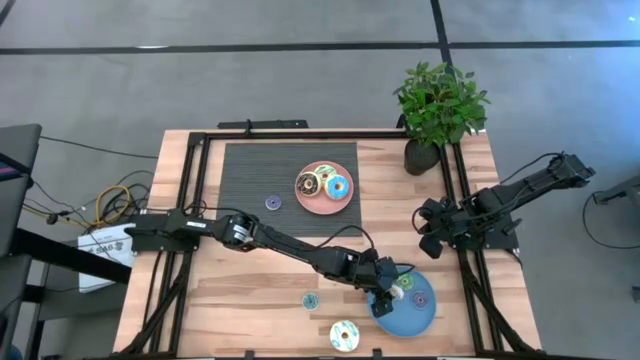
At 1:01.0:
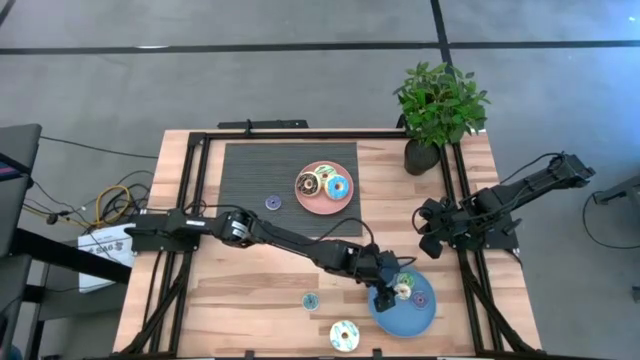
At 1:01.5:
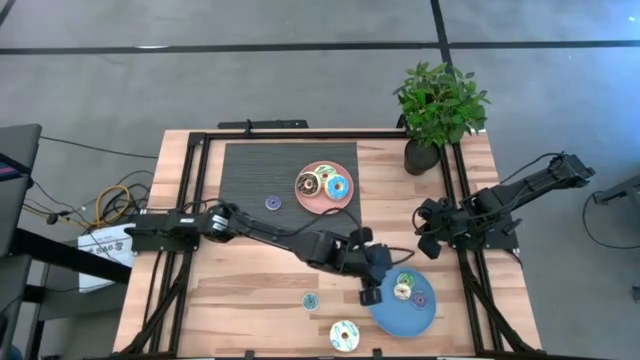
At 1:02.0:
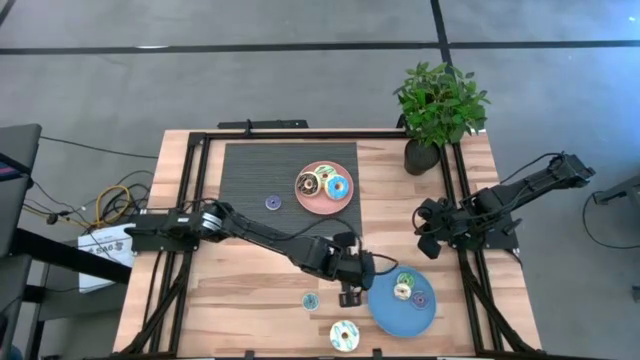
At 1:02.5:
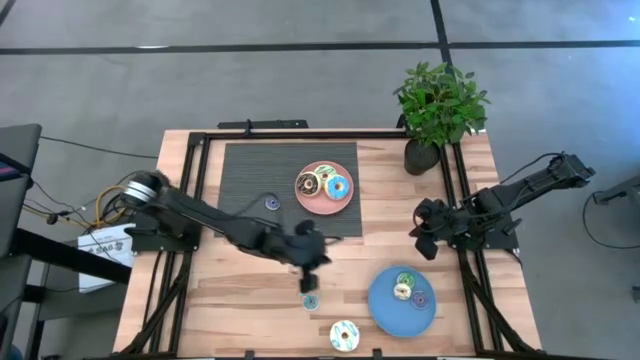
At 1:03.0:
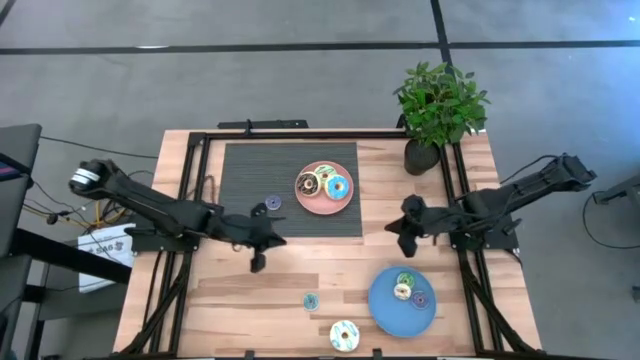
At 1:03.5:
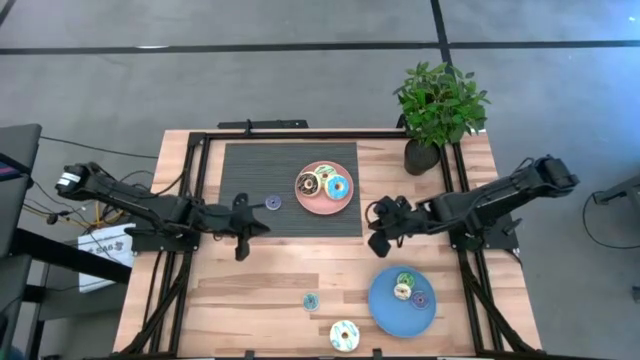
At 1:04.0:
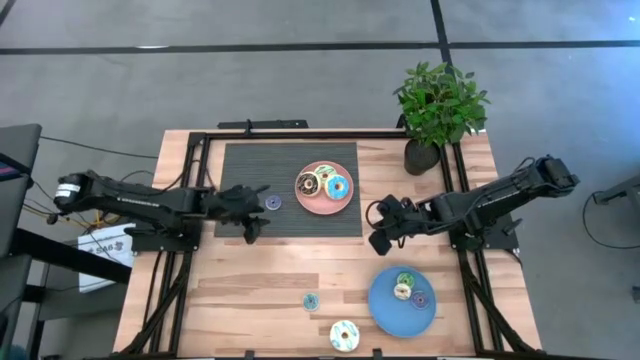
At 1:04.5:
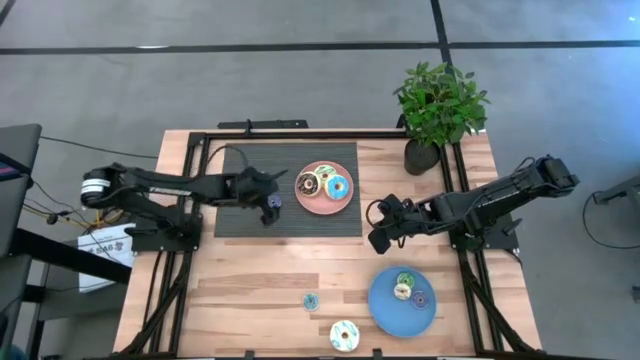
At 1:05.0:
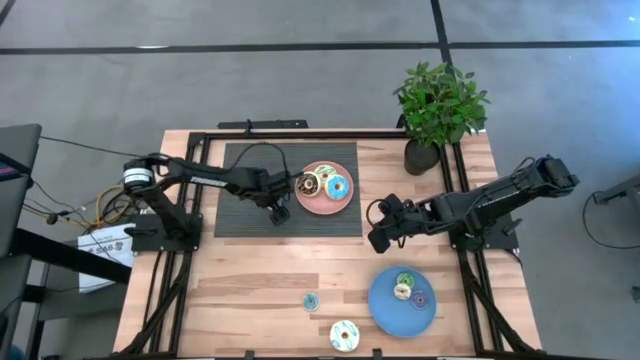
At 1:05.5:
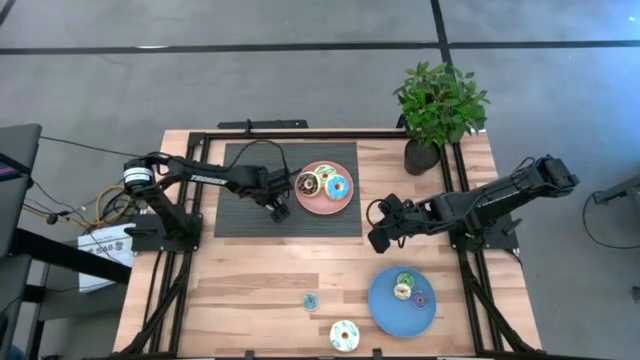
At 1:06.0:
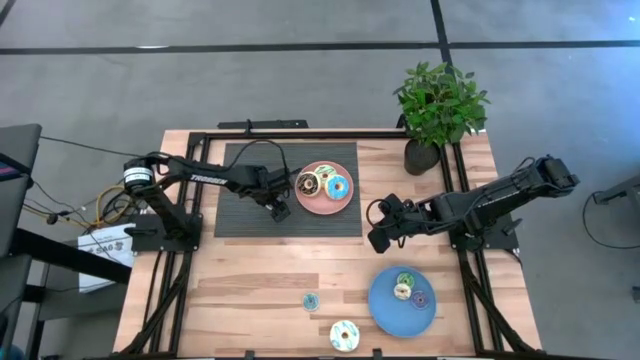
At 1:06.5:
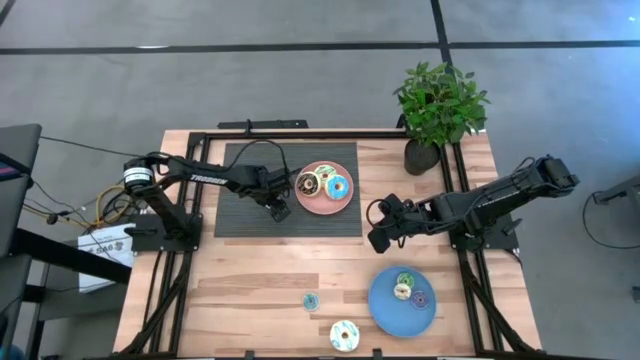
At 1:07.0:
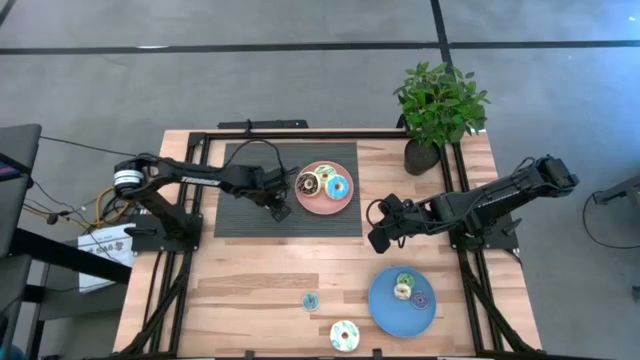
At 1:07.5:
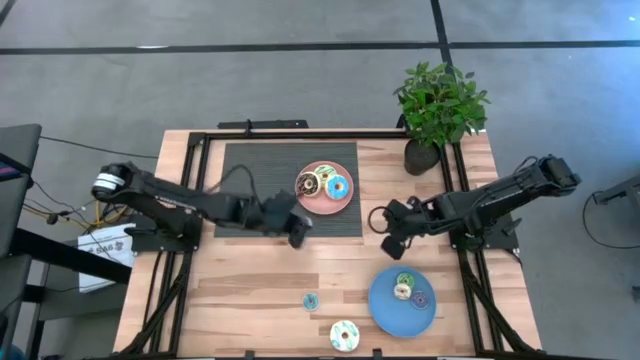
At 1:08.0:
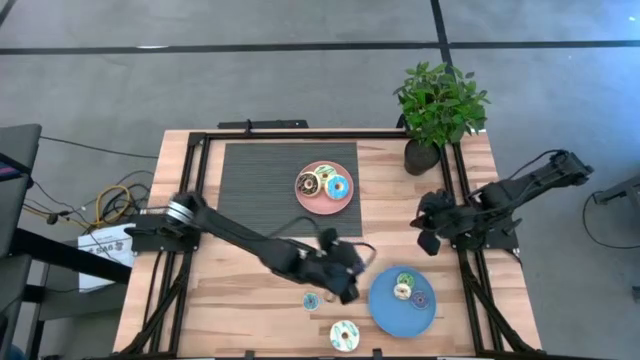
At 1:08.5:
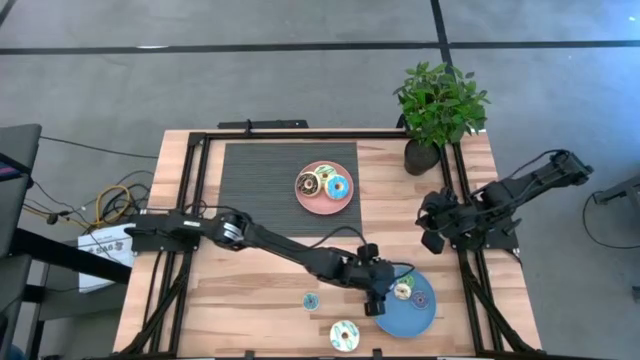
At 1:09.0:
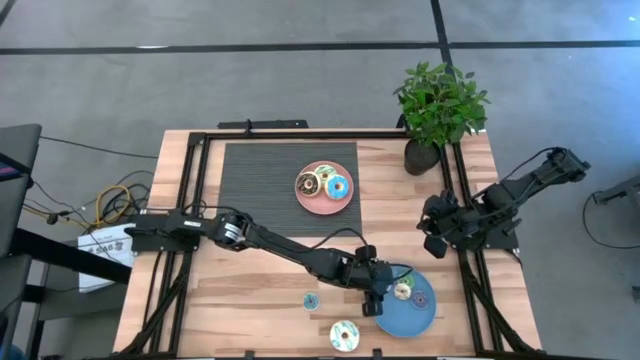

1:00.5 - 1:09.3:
Task: Pick & Place donuts
Put the small purple donut on the blue plate

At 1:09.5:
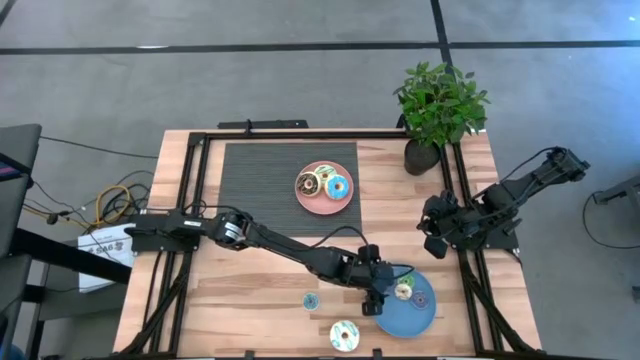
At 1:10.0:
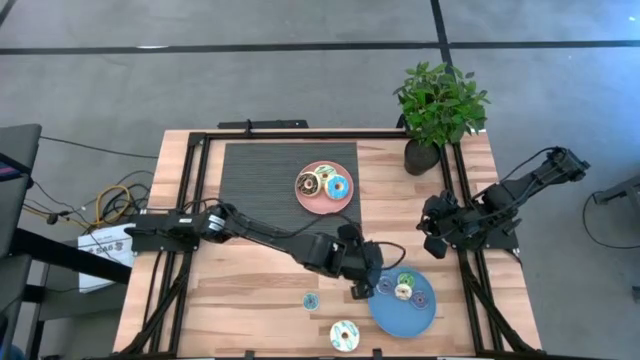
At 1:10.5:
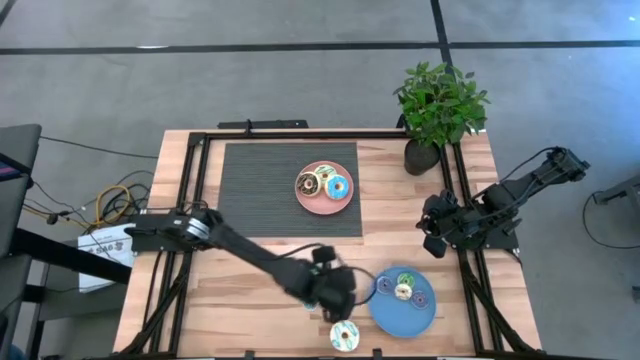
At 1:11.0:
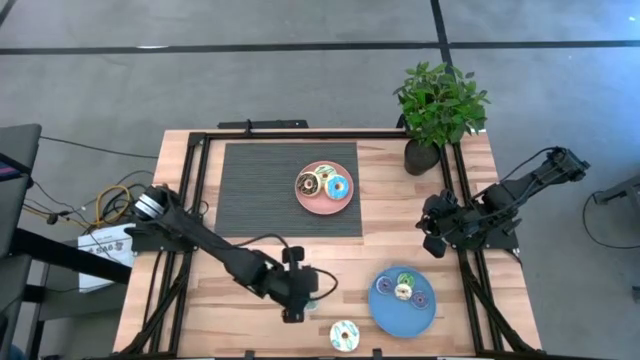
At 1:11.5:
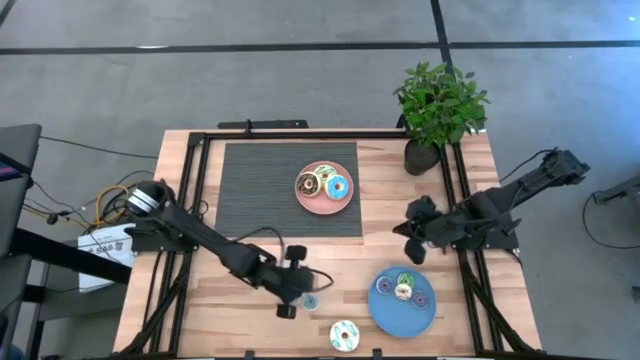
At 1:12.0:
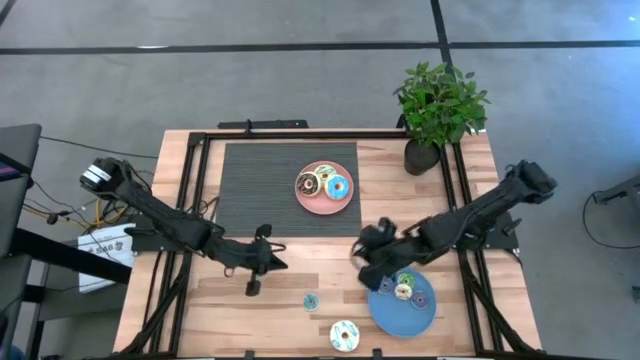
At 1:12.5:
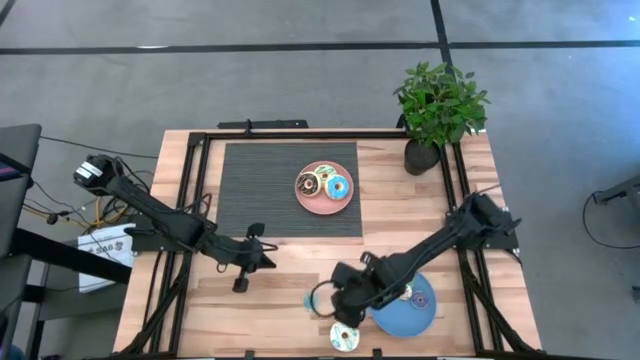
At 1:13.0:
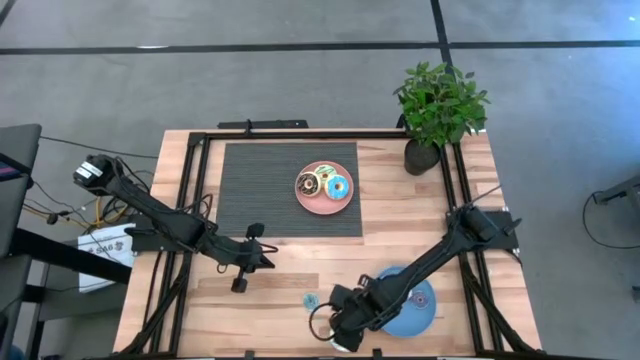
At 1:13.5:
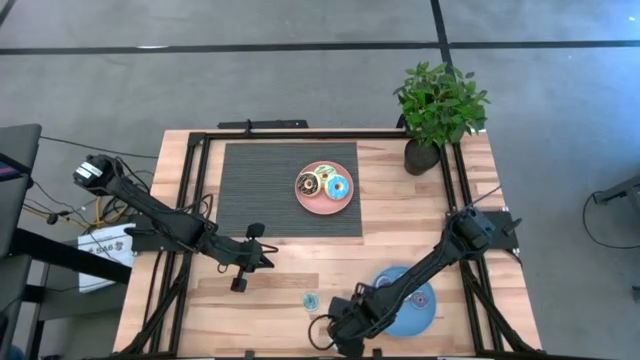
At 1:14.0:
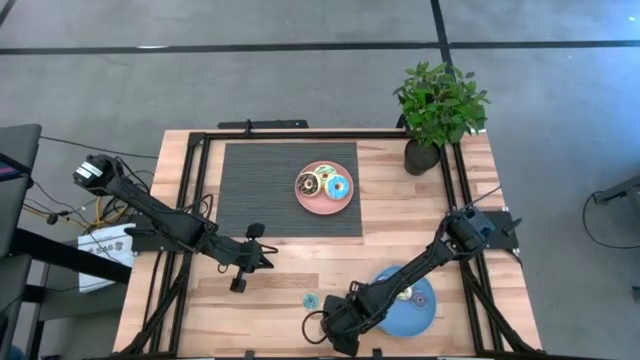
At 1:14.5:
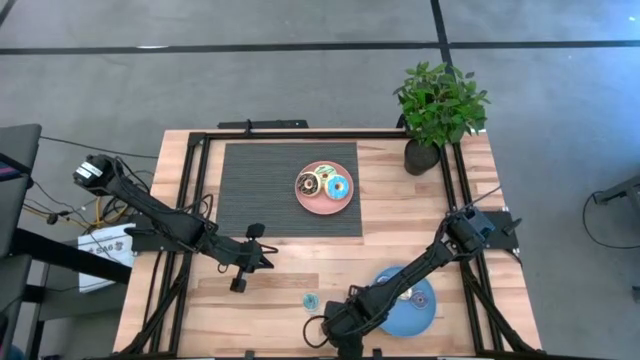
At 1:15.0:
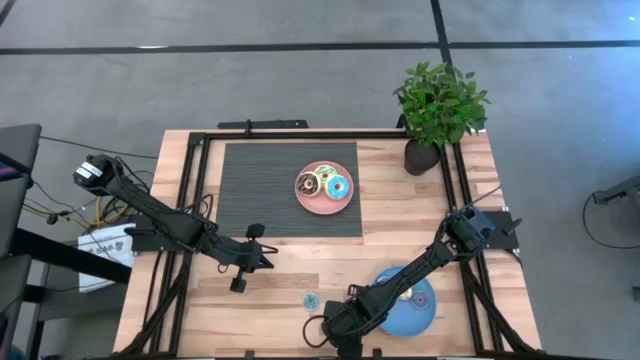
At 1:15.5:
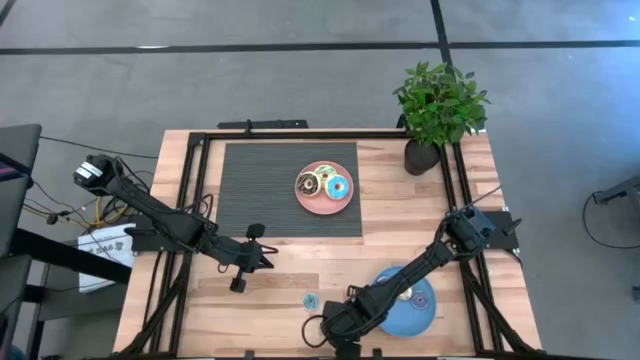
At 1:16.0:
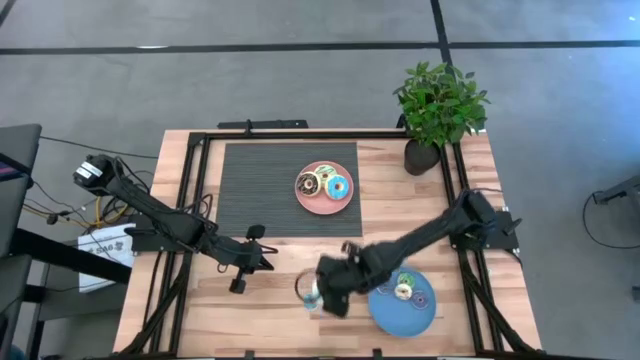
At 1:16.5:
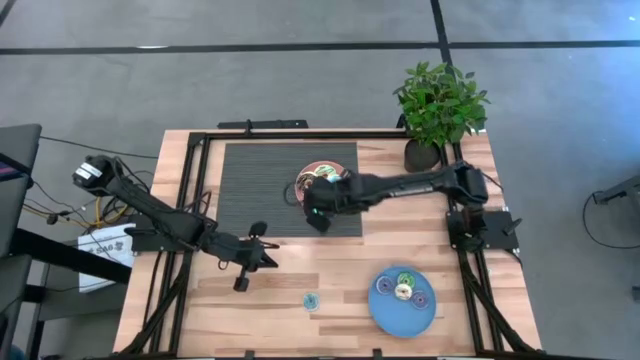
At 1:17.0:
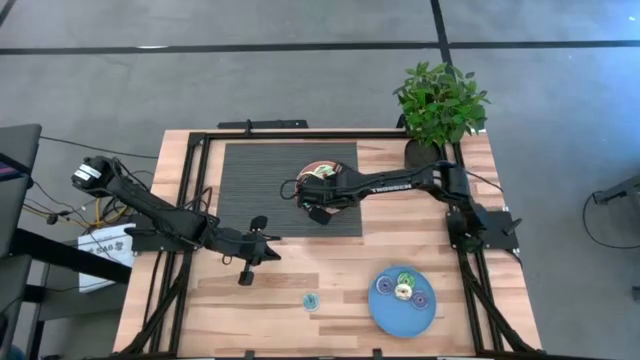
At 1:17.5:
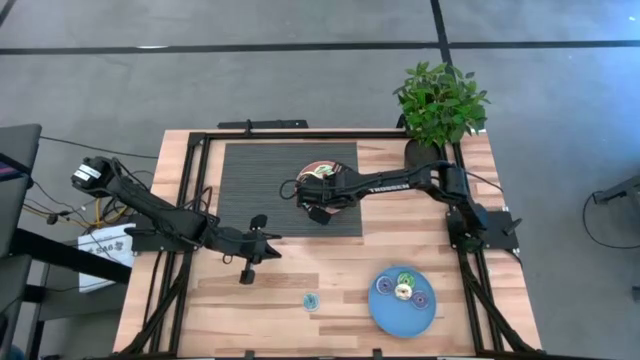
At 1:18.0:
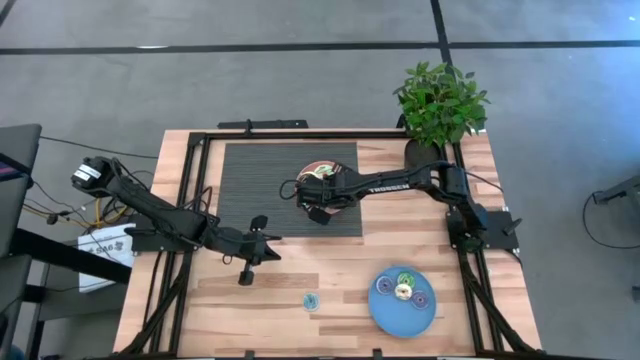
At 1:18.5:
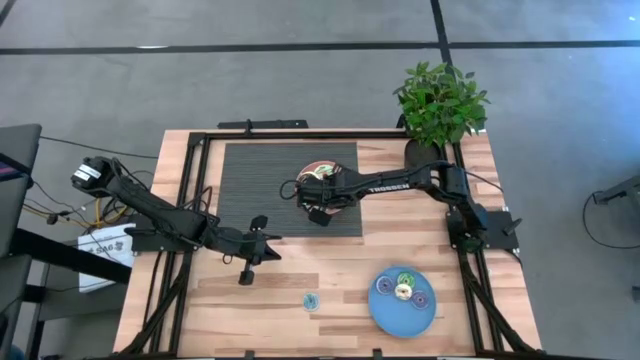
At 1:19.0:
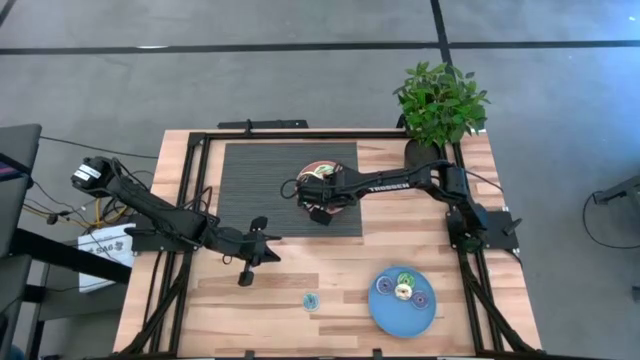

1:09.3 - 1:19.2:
Put the big white donut on the pink plate

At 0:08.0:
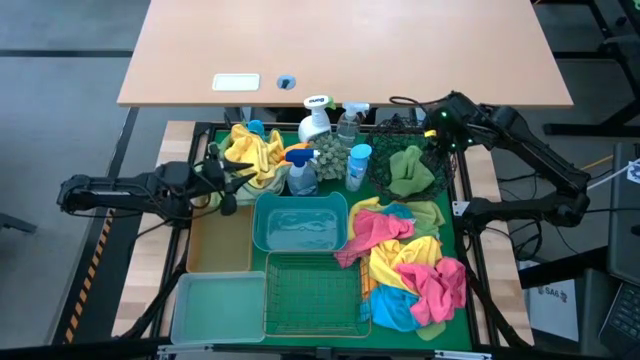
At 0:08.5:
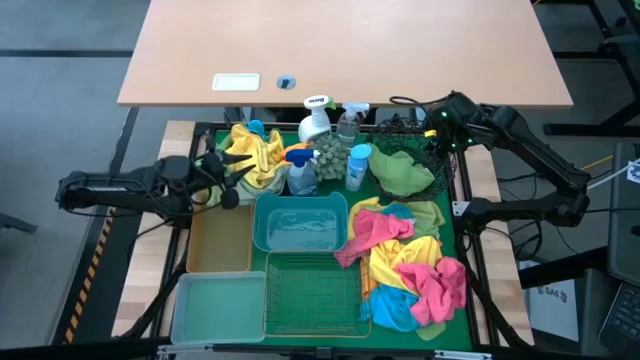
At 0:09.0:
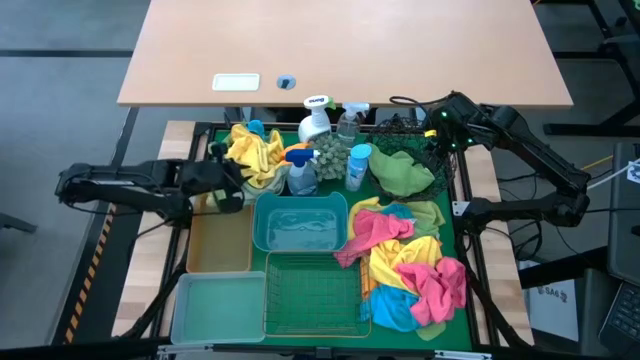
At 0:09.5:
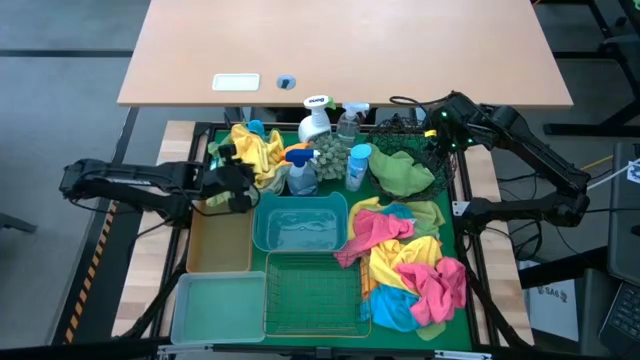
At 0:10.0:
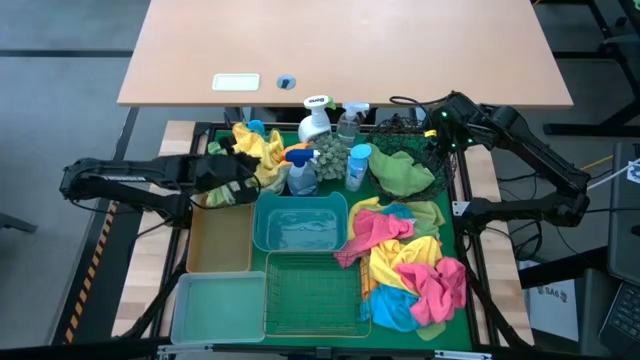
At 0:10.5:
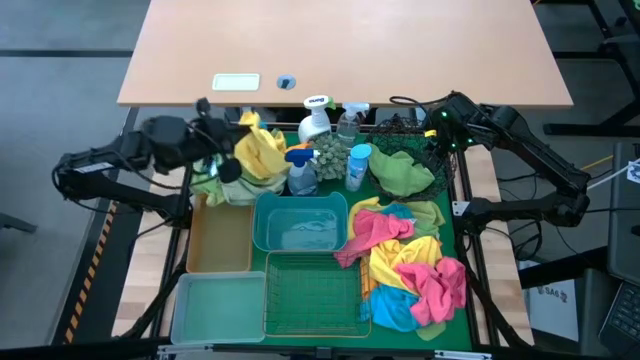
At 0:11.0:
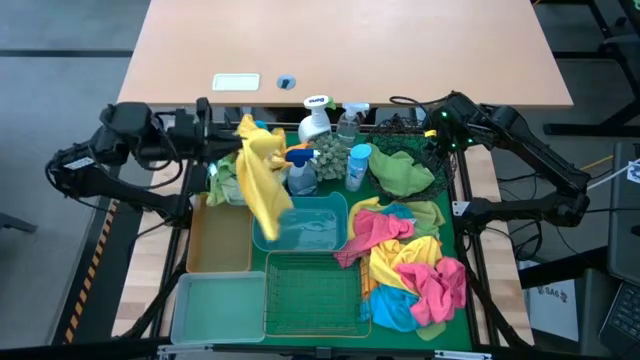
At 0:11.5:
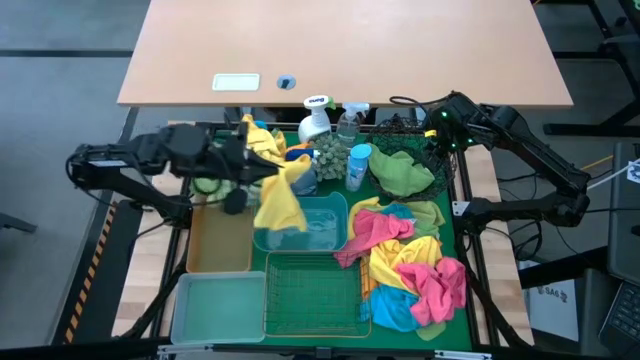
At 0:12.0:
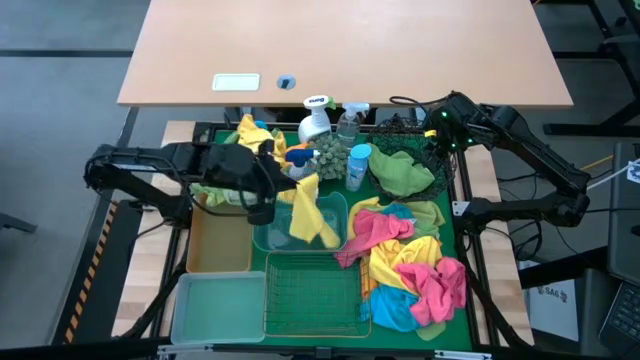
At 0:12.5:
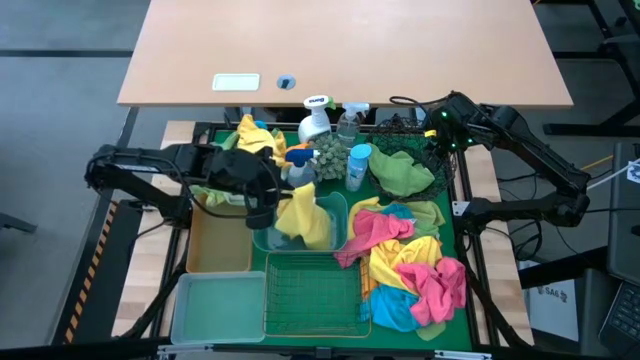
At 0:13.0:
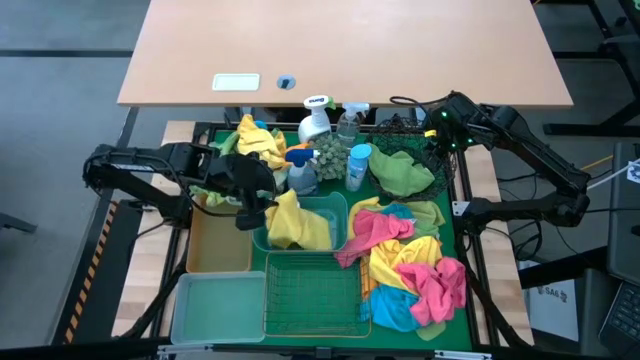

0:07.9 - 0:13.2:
Task: Sort microfiber towel by color & place in baskets
Put the yellow microfiber towel into the blue bin
